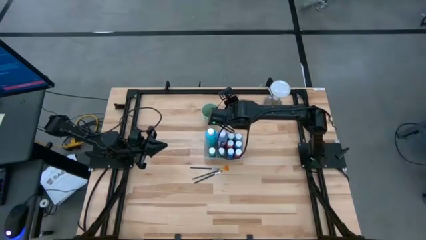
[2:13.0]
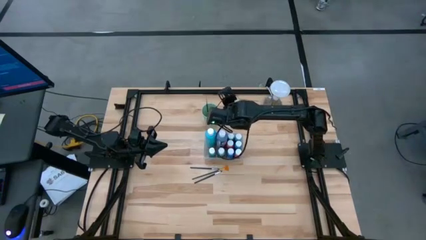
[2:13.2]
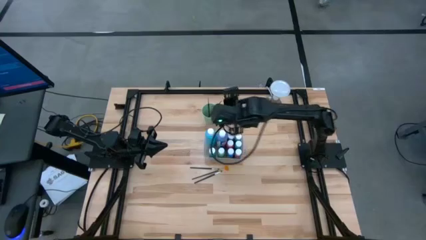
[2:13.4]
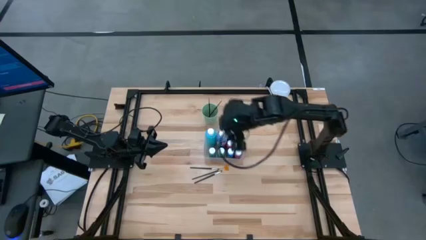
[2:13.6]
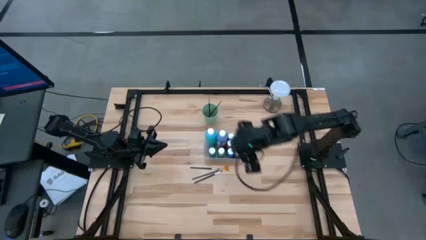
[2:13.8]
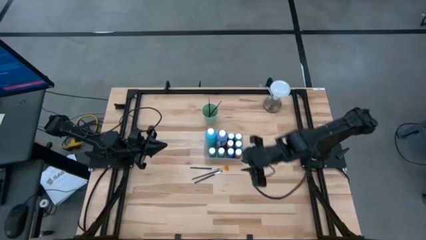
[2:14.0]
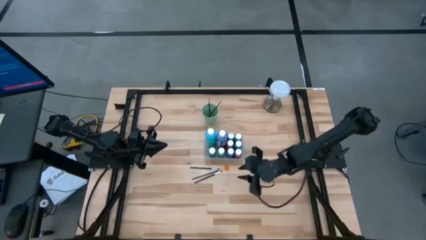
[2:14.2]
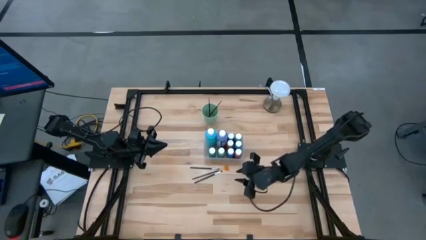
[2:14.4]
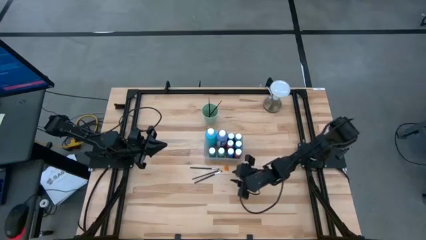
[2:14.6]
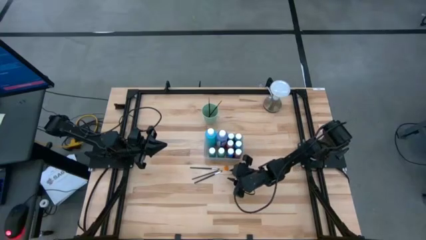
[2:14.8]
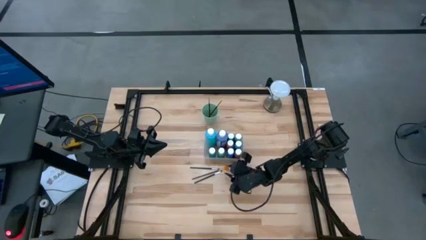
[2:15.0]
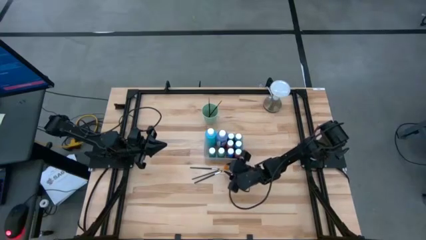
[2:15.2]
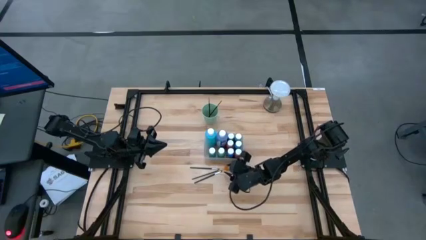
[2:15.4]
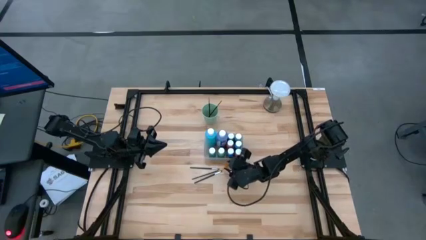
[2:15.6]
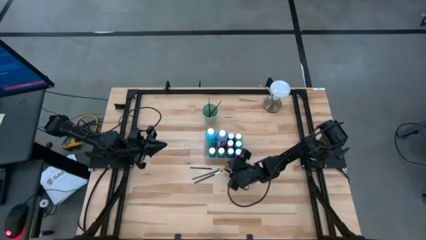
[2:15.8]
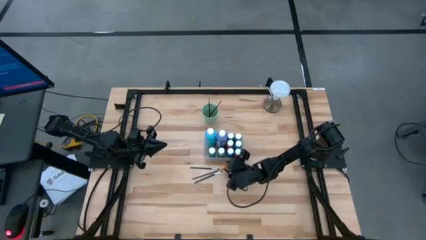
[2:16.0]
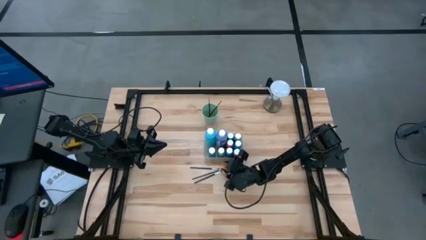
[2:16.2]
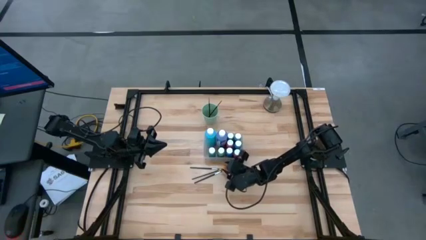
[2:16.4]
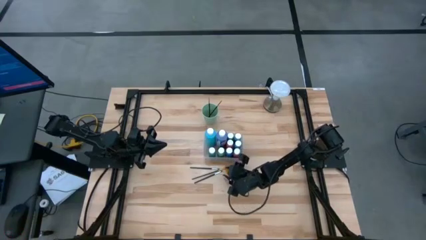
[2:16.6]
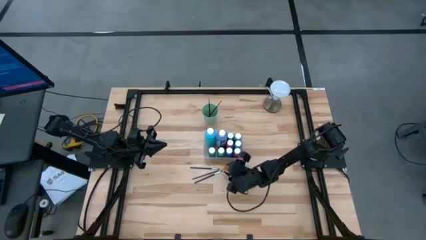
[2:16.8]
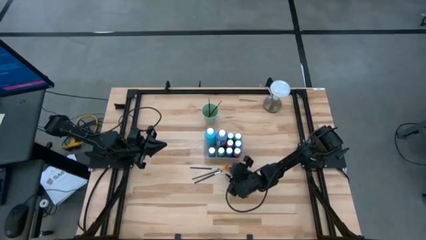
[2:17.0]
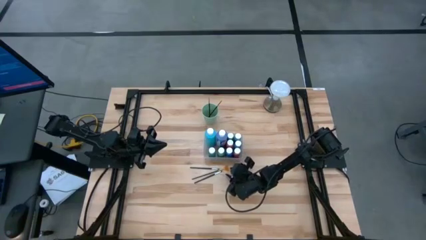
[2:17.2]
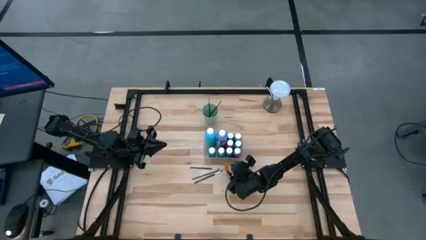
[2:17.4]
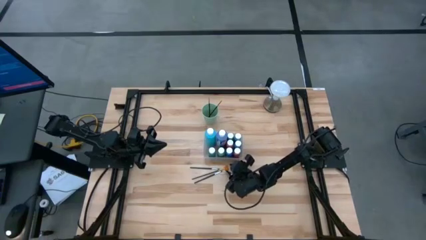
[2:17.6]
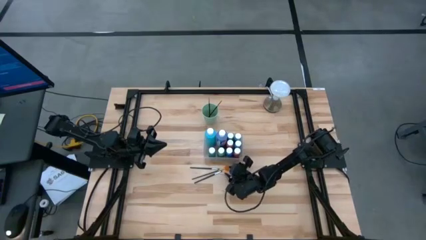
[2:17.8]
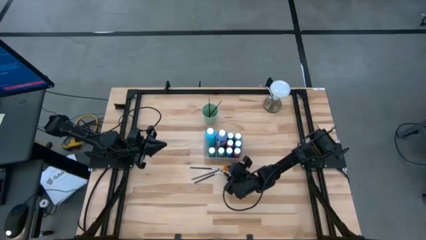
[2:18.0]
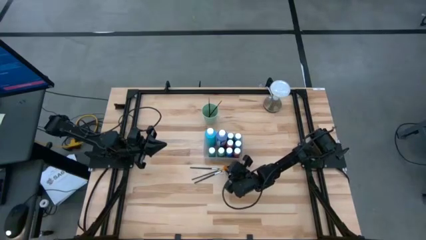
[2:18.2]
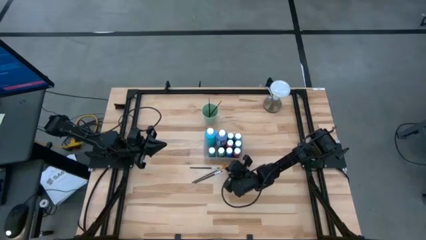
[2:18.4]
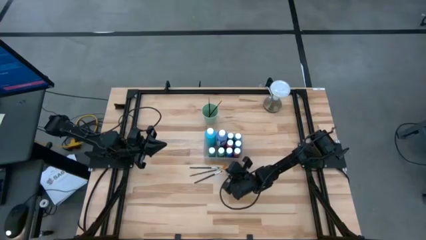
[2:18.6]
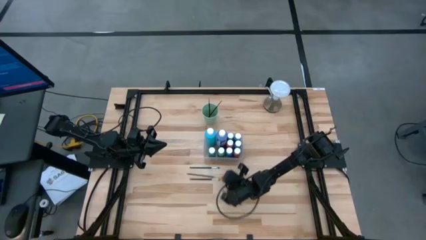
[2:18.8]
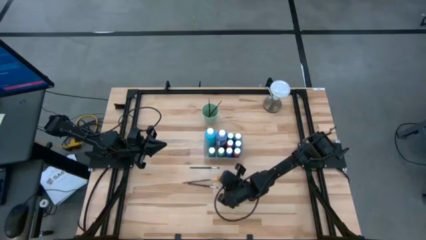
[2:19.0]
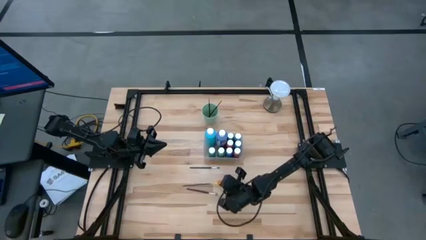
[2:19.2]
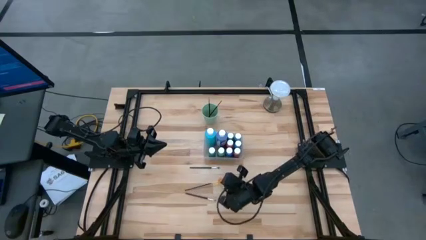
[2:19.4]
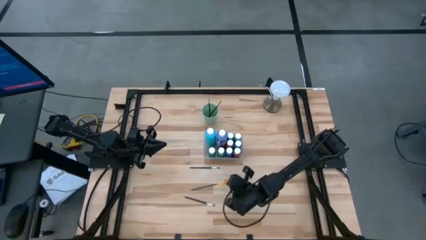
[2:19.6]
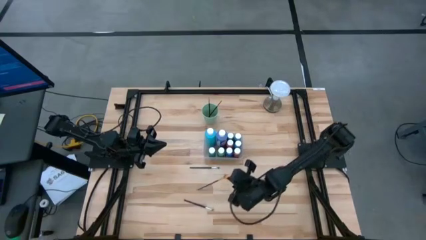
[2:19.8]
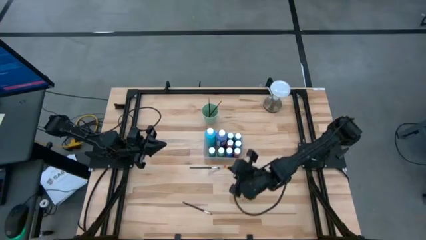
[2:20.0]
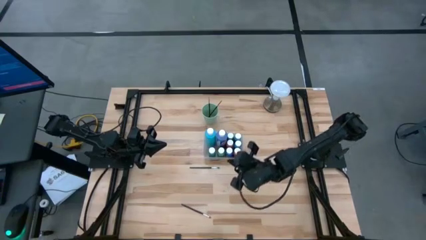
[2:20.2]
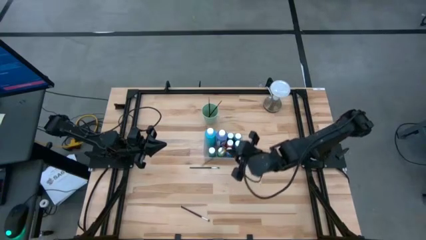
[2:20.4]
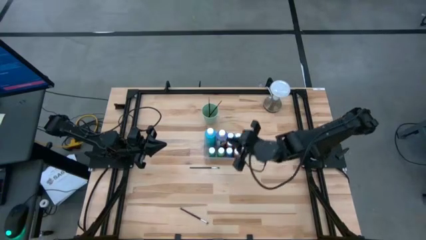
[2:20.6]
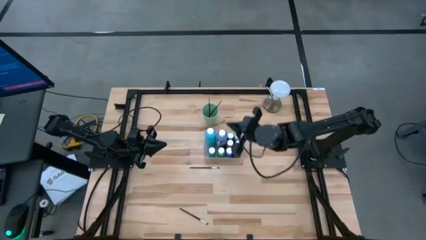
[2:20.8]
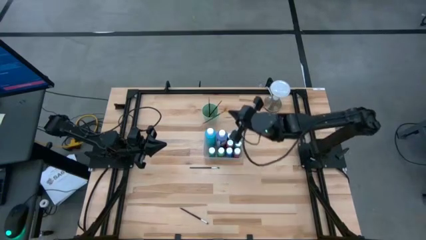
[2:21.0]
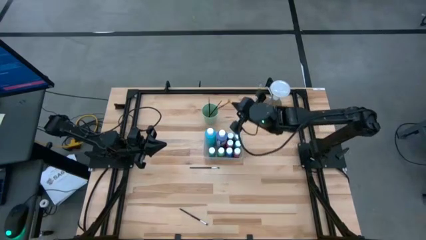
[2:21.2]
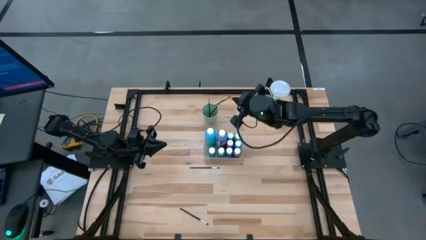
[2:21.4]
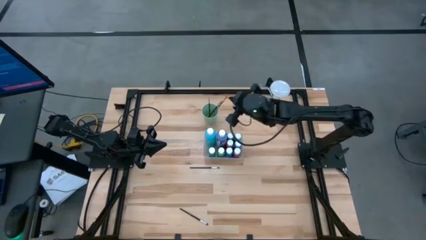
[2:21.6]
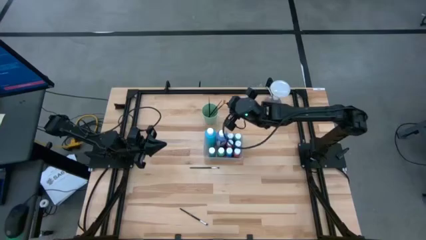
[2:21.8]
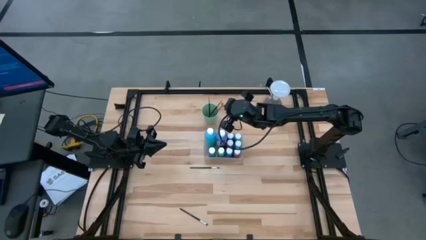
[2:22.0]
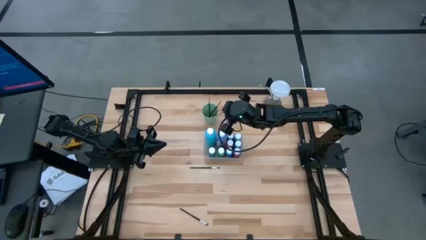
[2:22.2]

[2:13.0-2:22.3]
Task: Pick & Place Paint Supplies
Put the black brush into the green cup

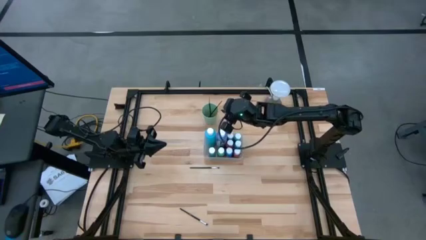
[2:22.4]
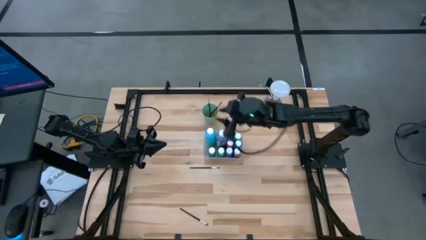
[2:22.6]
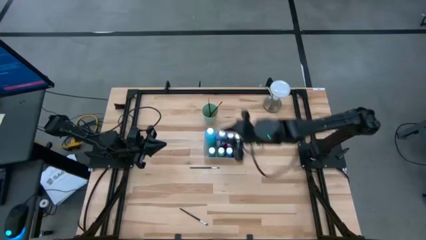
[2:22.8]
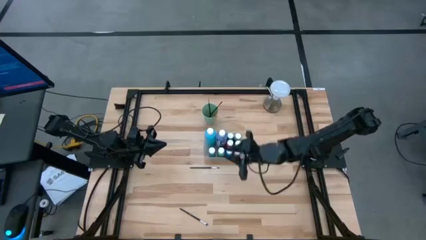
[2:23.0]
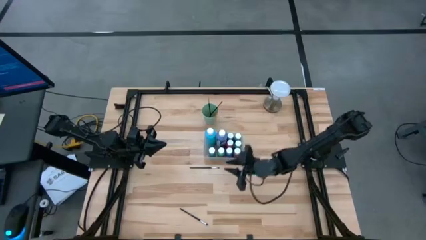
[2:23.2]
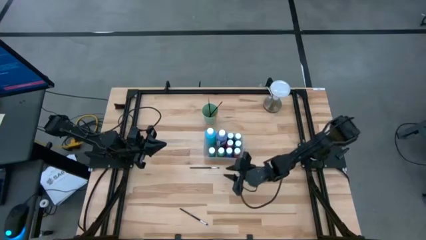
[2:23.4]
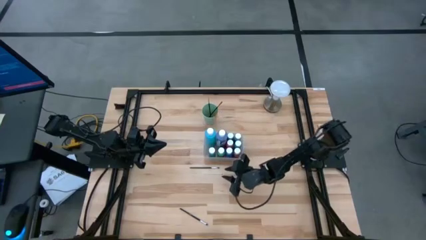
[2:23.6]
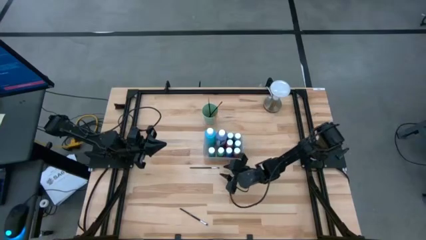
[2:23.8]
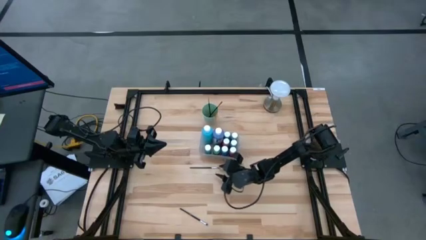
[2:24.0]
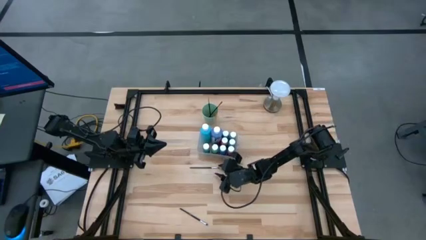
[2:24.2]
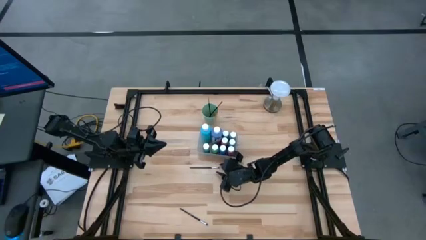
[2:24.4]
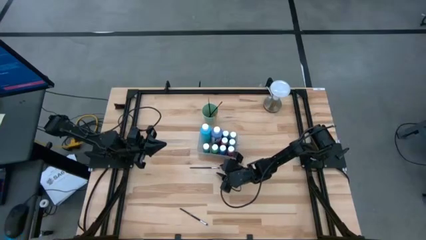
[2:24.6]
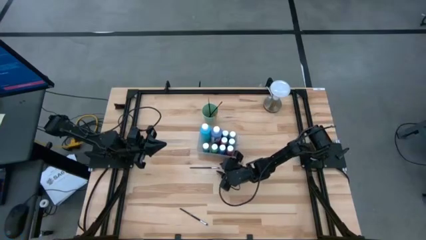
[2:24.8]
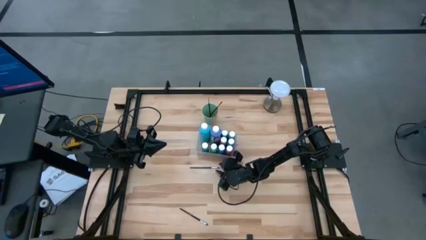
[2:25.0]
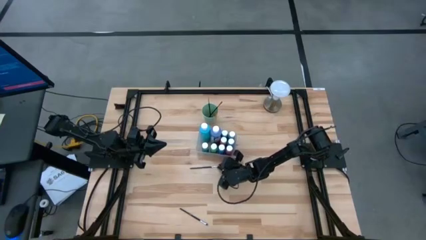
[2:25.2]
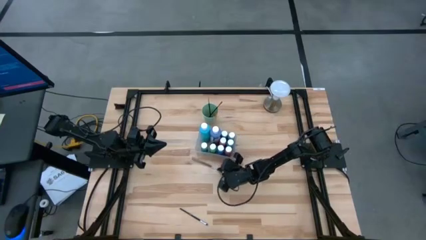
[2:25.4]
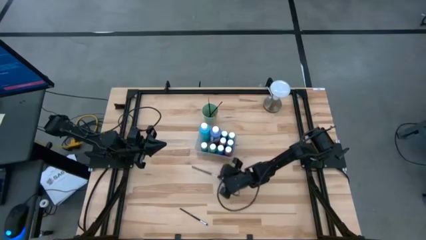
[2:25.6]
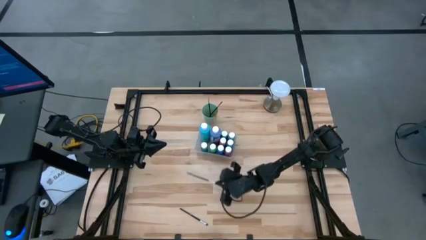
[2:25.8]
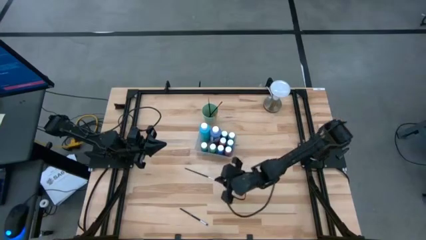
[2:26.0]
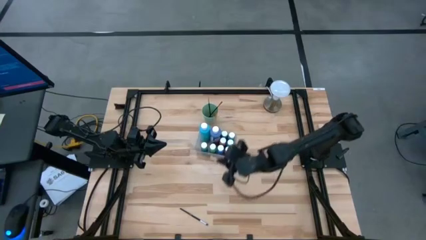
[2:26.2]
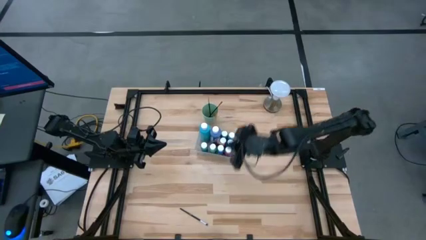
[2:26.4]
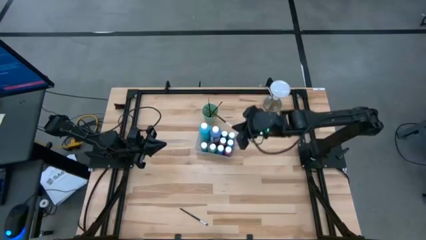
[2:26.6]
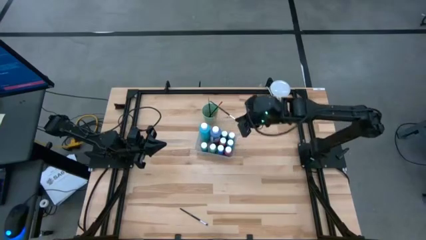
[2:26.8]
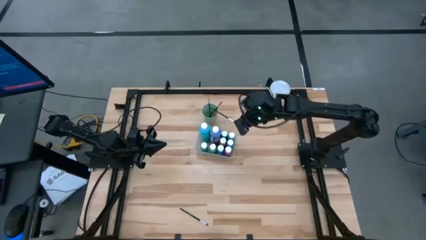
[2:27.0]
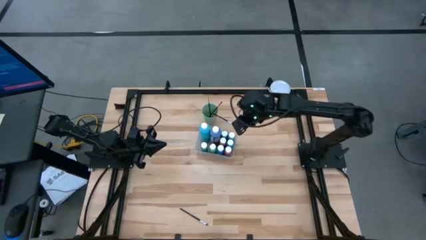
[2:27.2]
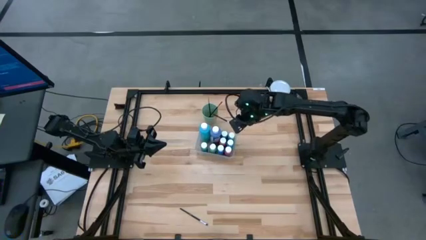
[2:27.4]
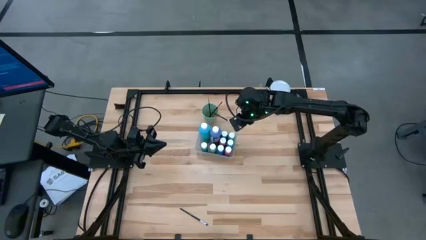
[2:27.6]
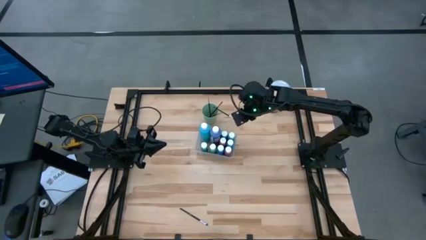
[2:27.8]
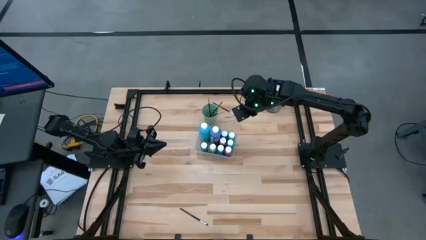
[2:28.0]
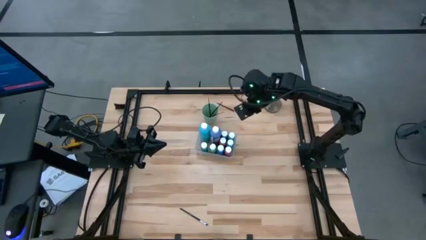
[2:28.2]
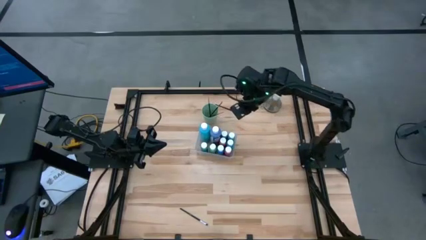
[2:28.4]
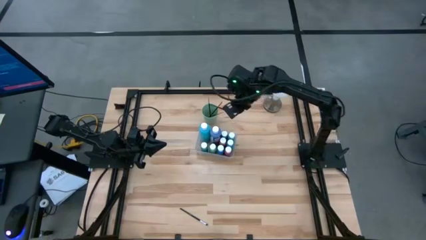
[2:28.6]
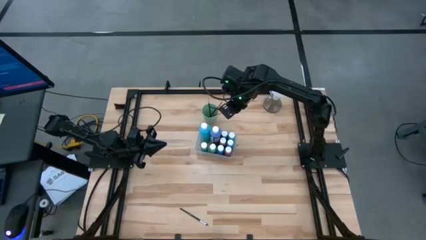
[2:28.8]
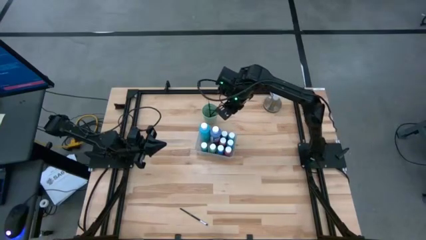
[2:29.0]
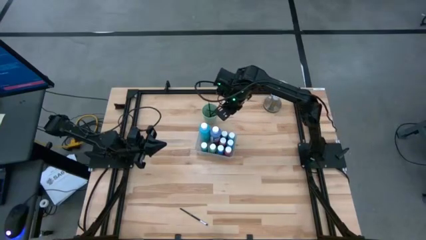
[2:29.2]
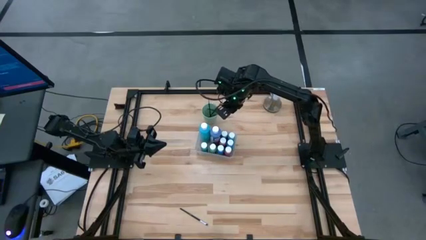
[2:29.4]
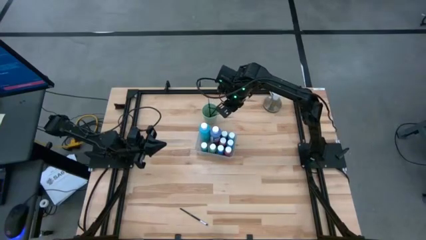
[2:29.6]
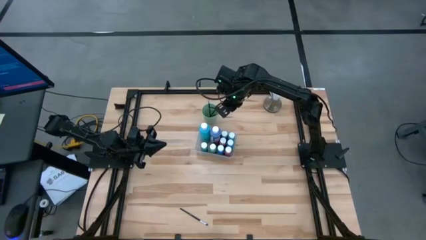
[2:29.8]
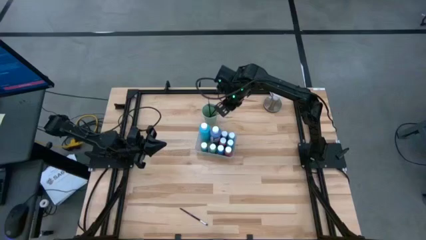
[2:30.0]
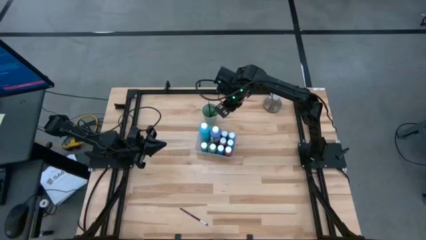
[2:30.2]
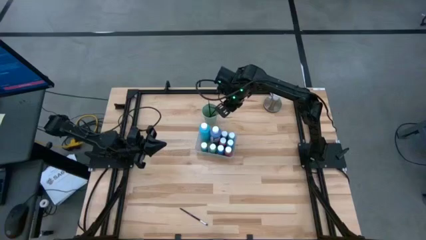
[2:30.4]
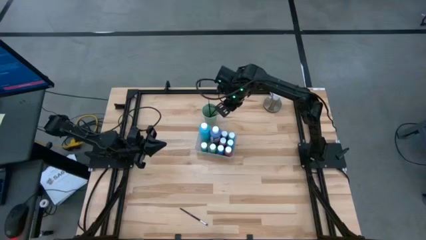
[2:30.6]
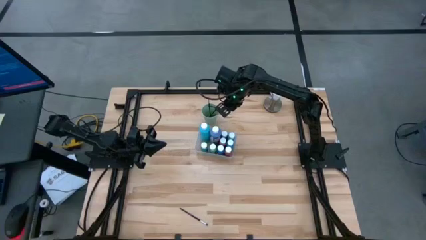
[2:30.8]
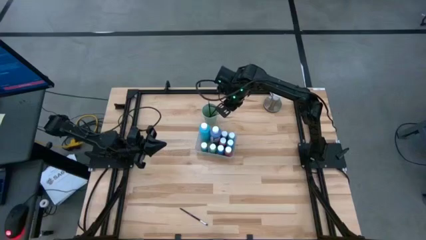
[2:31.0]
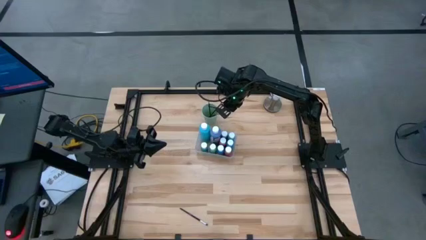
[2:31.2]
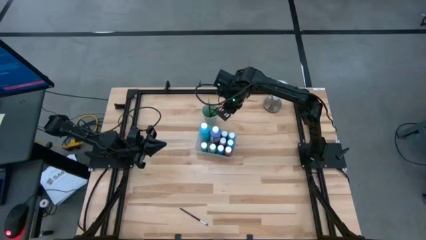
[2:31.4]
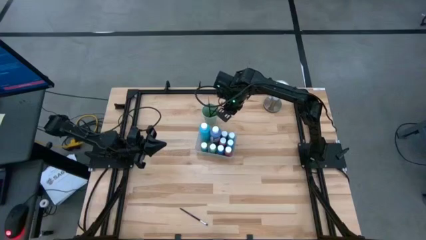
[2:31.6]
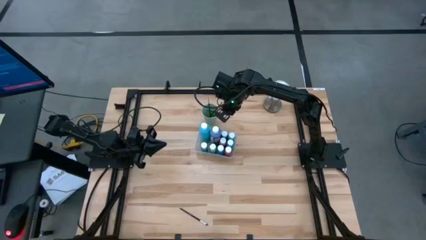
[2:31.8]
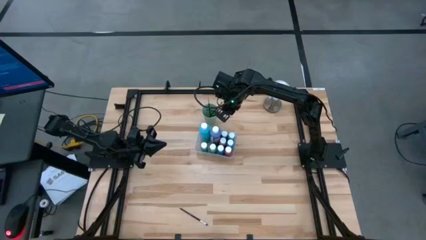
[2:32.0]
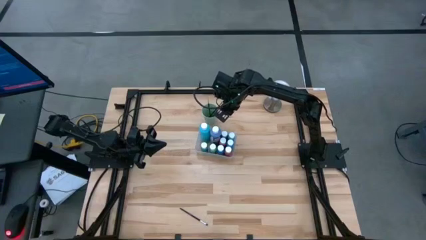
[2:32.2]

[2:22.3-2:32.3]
Put the black brush into the green cup
